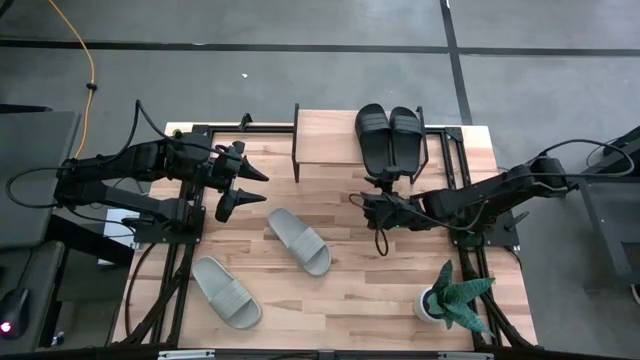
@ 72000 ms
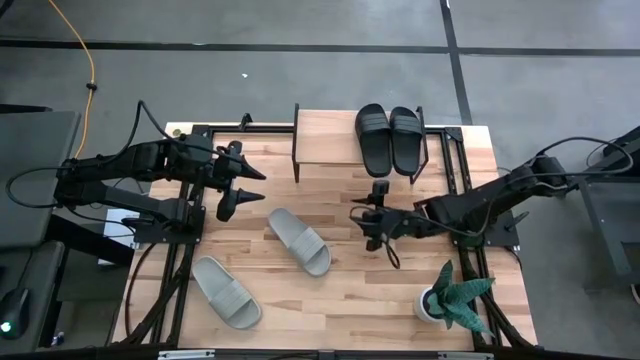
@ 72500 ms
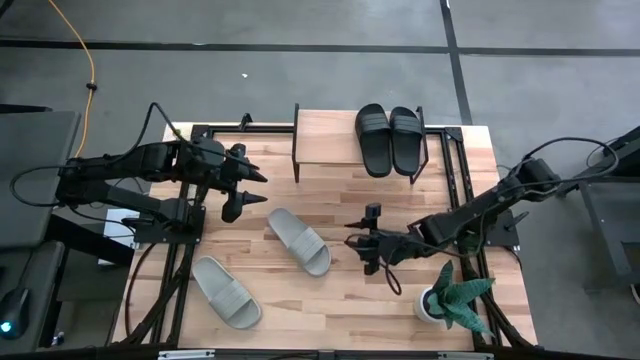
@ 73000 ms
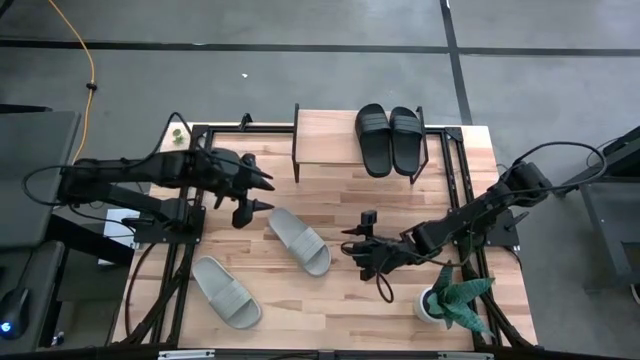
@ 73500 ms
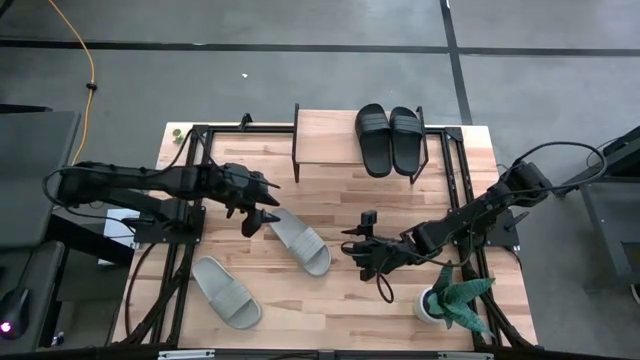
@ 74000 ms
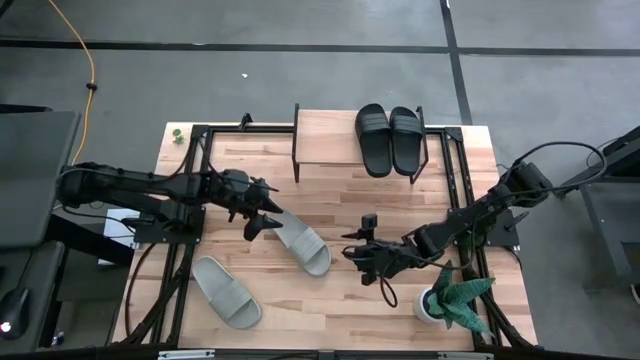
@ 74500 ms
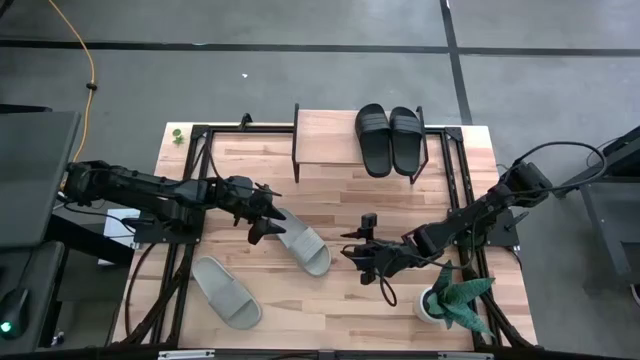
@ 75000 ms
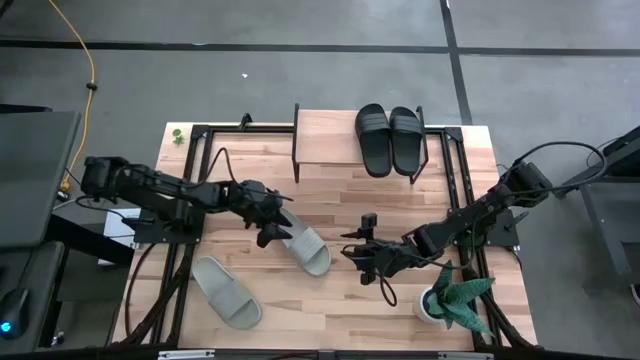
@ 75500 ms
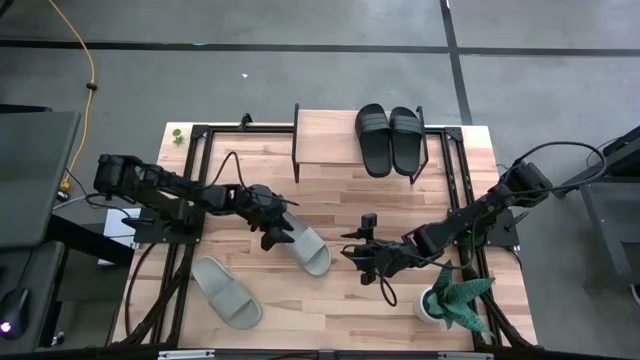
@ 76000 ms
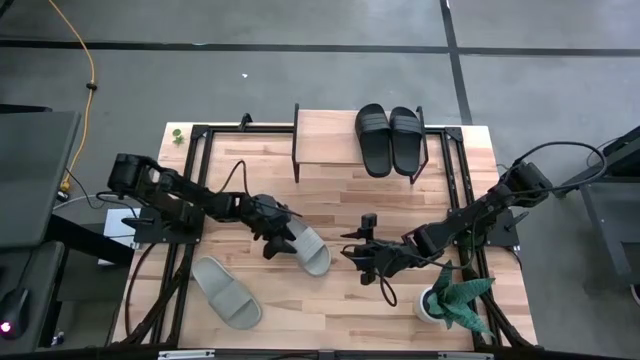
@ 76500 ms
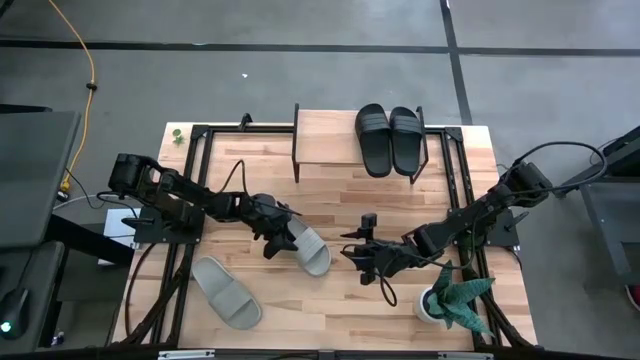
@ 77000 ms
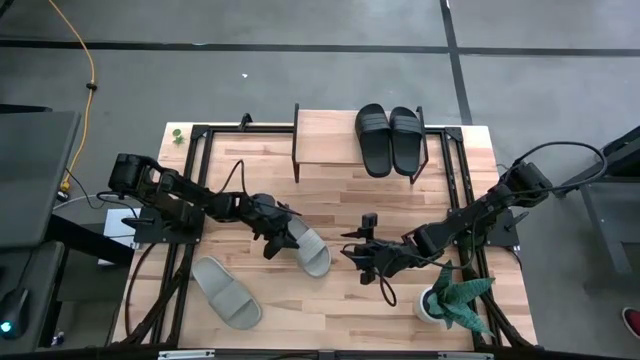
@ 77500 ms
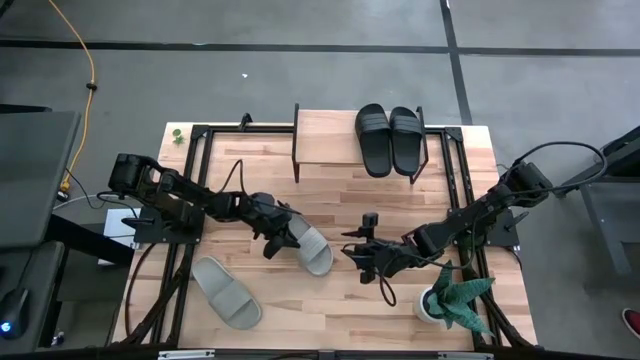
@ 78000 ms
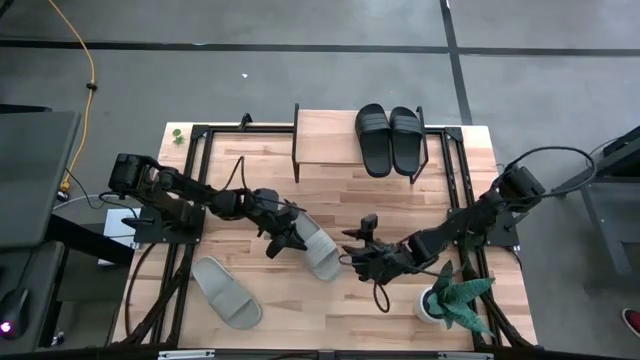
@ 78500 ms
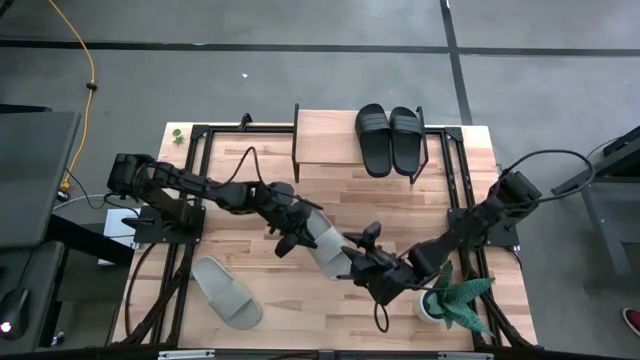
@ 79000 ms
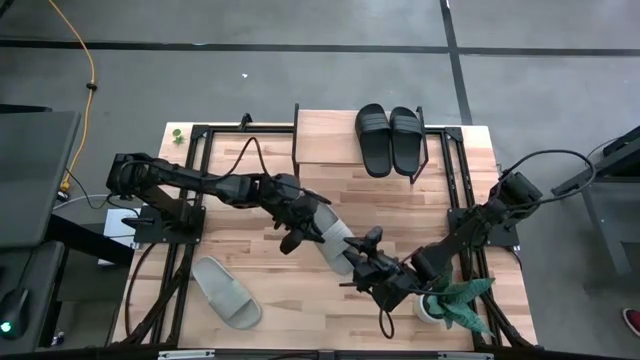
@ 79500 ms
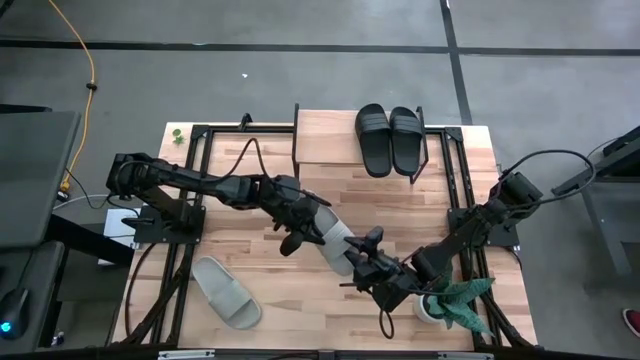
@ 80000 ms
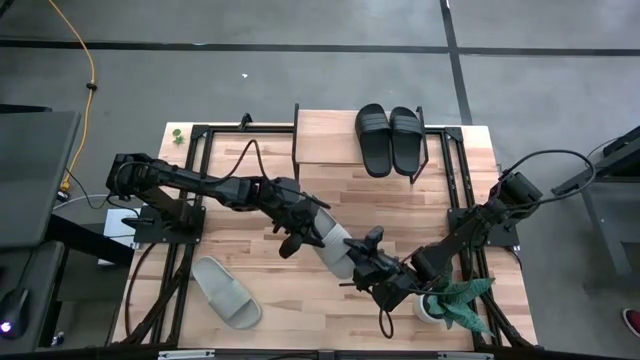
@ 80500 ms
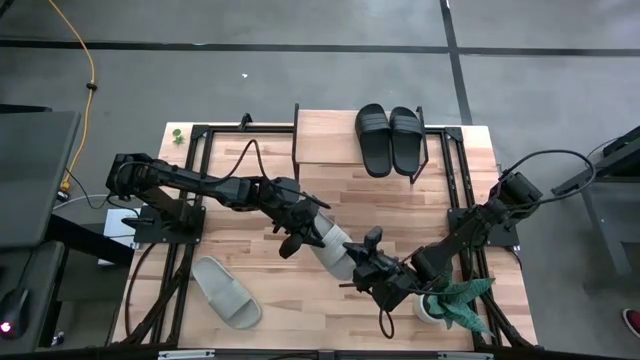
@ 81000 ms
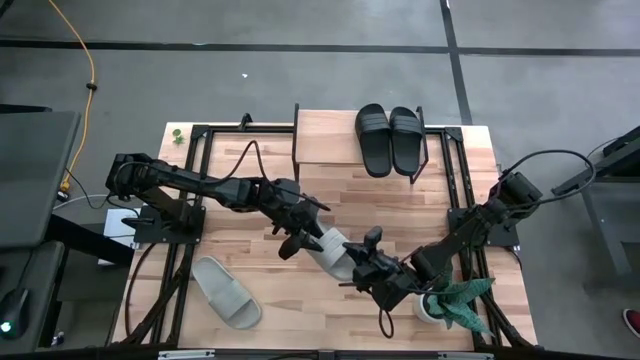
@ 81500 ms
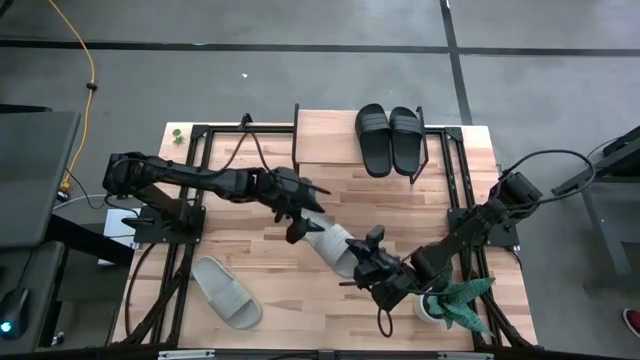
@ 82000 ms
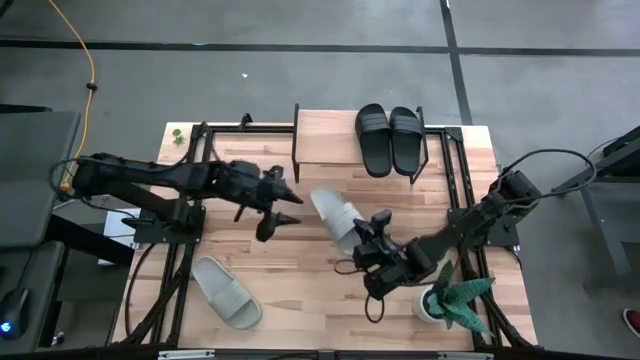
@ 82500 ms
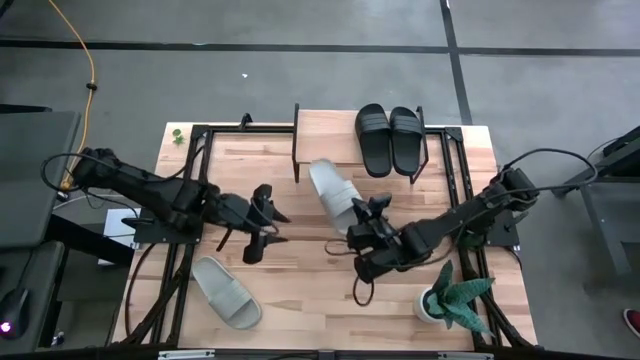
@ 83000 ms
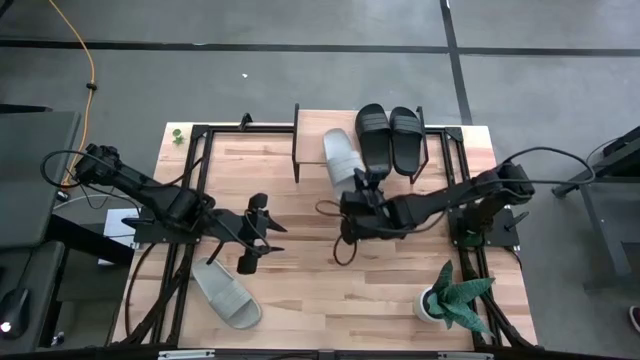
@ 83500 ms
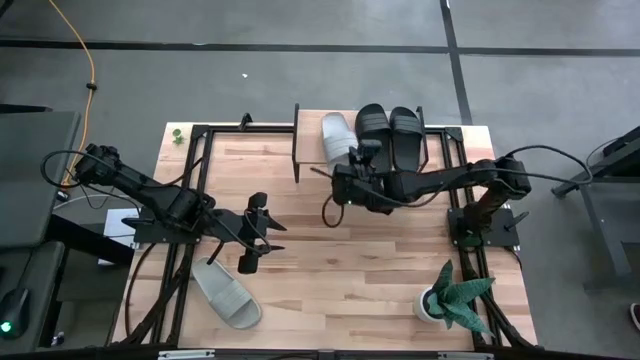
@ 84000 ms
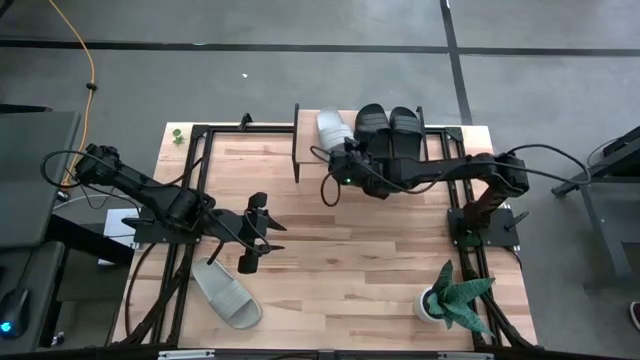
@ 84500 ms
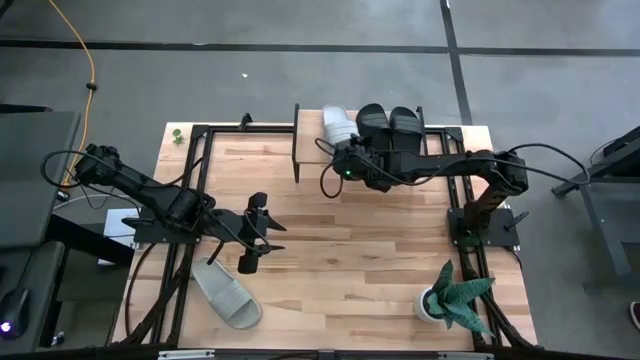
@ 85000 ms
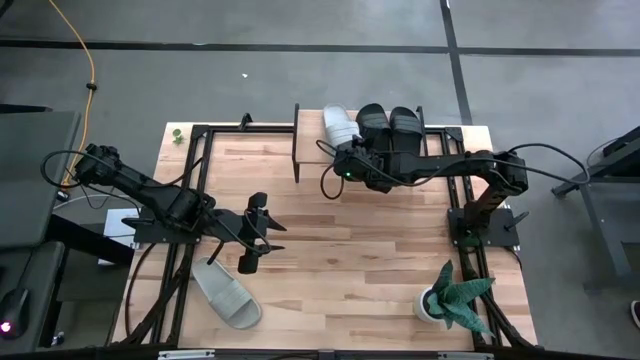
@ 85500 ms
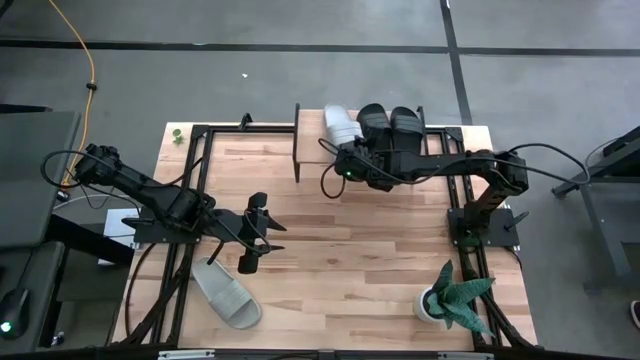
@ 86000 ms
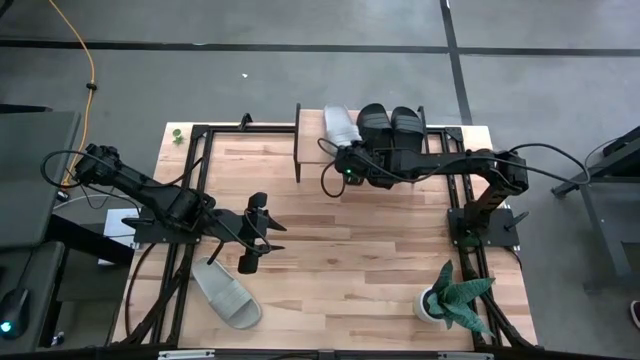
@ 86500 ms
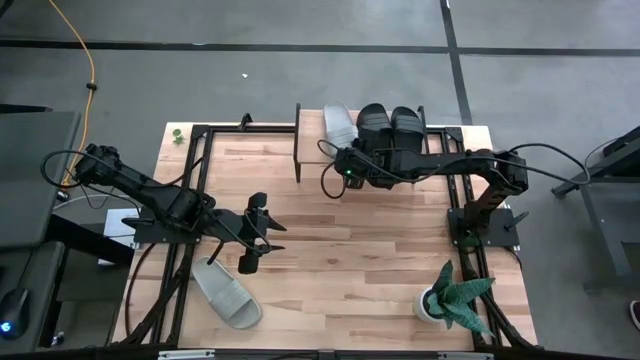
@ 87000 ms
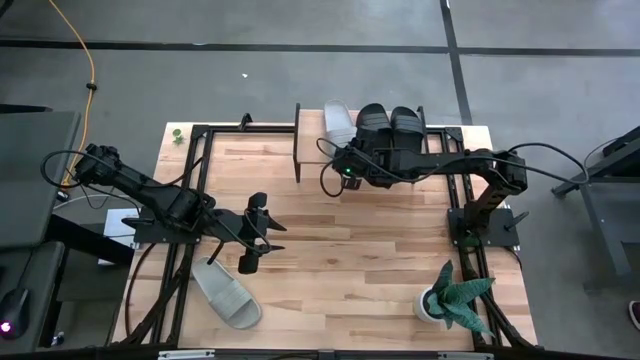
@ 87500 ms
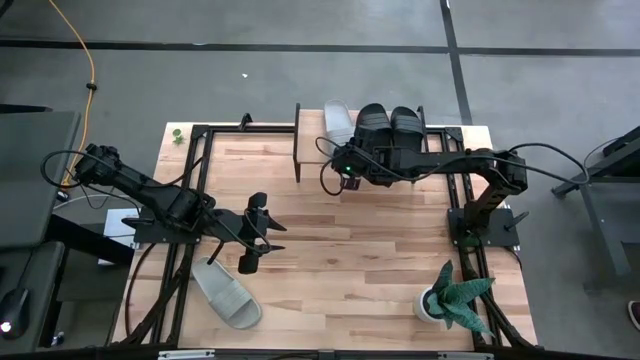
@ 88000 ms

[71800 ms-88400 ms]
Task: Pick and place slides into the shelf
Put the right gray slipper on the shelf

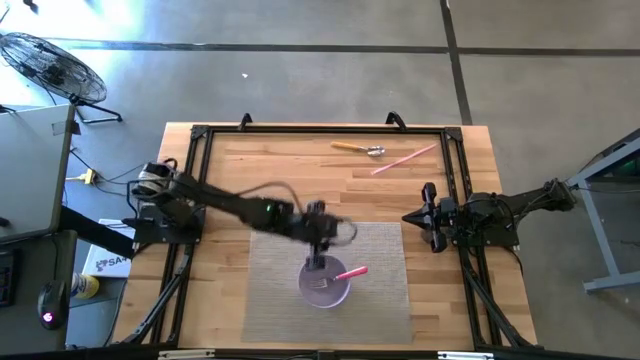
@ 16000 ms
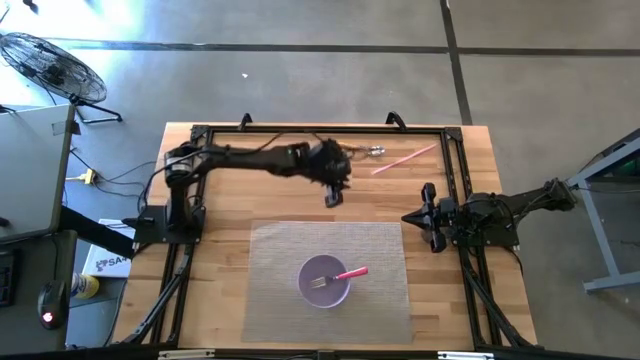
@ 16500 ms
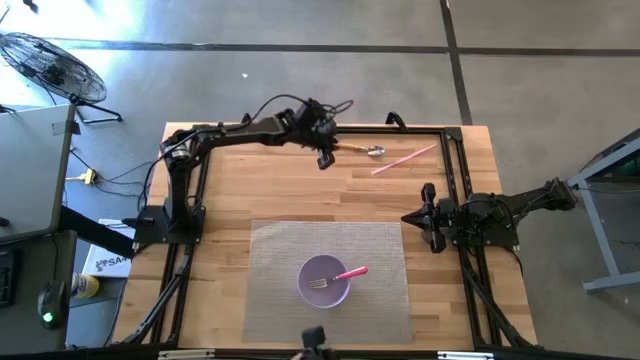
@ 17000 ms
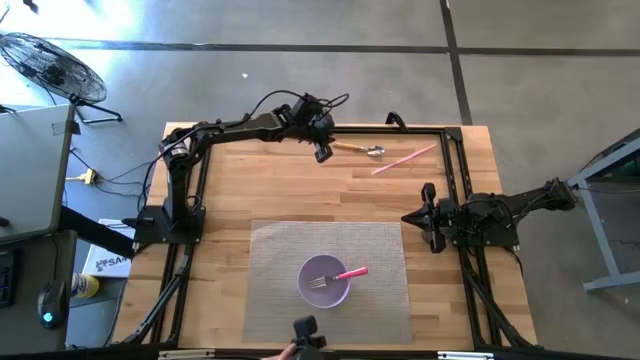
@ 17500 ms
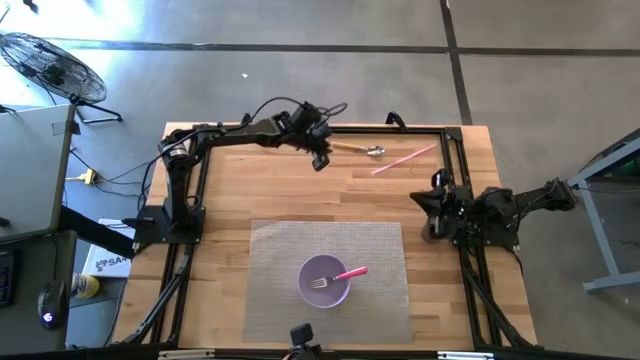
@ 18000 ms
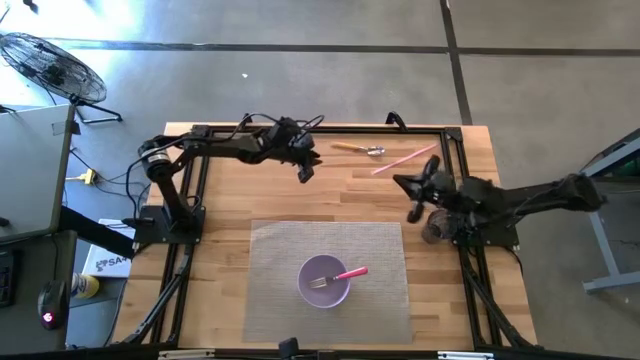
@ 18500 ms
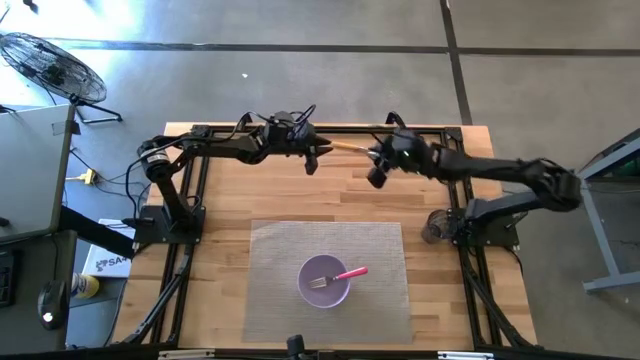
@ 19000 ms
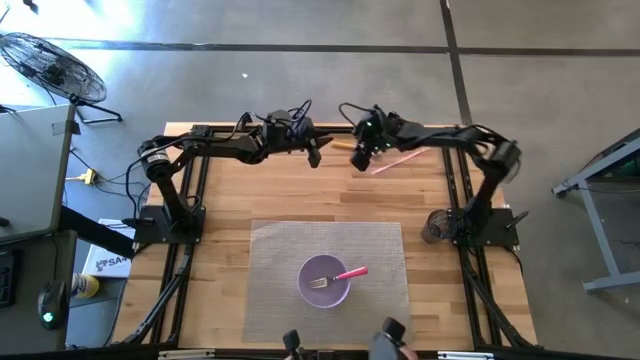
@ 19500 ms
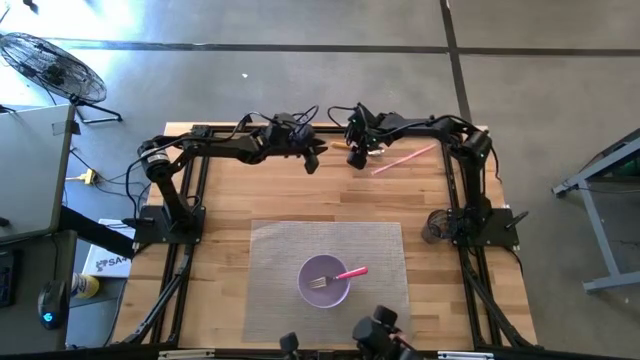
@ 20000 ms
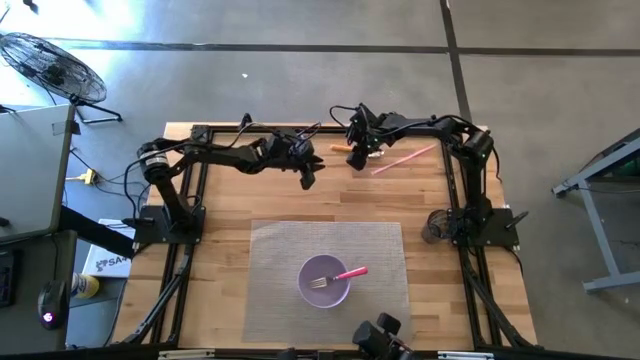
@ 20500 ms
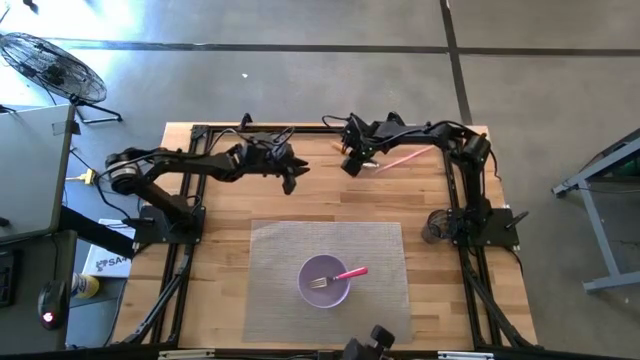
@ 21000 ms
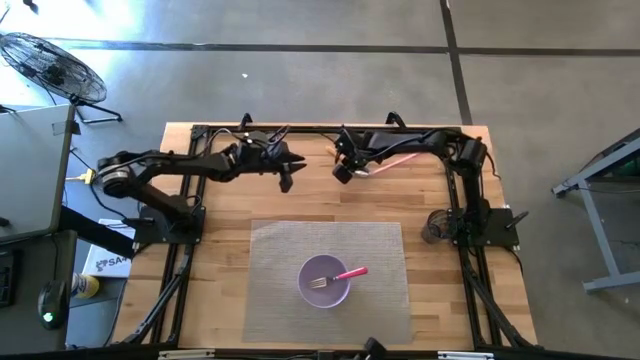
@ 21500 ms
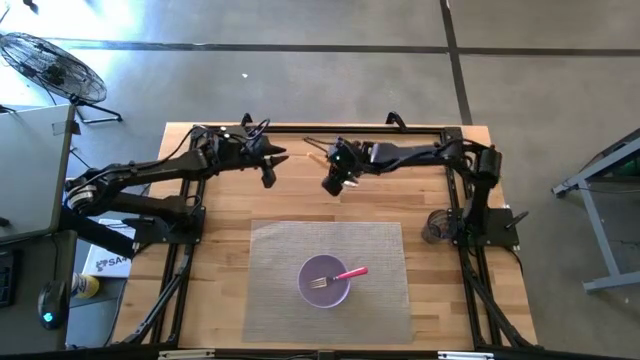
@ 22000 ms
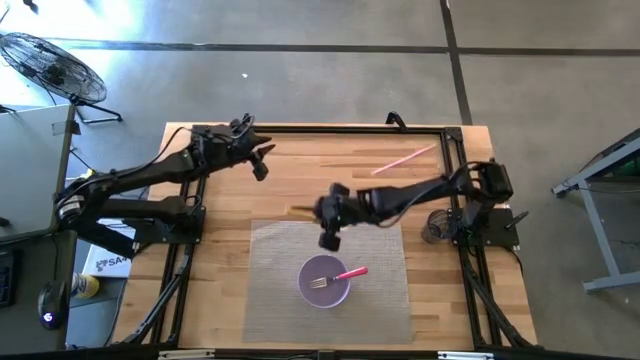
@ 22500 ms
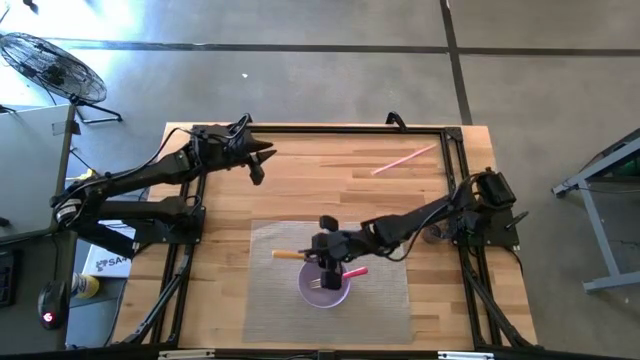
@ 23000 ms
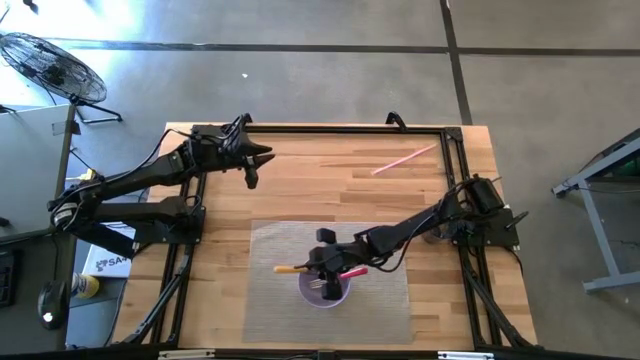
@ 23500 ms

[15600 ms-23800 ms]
Task: Pick & Place Utensil
Put the yellow spoon into the purple bowl on the gray mat
